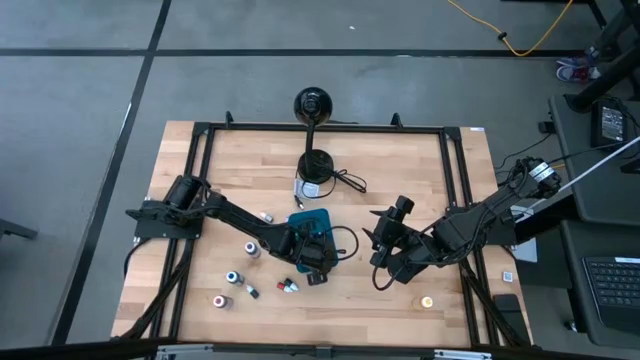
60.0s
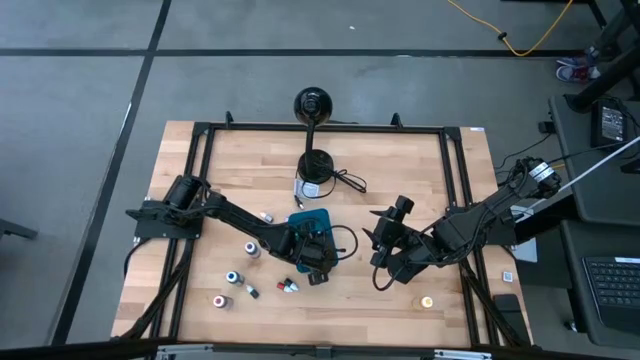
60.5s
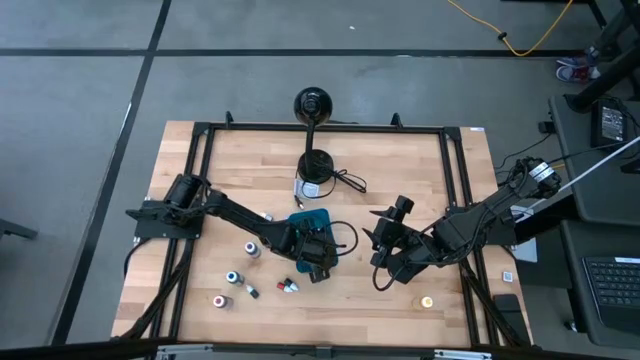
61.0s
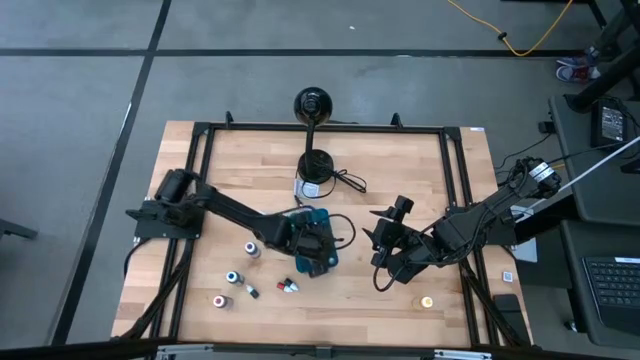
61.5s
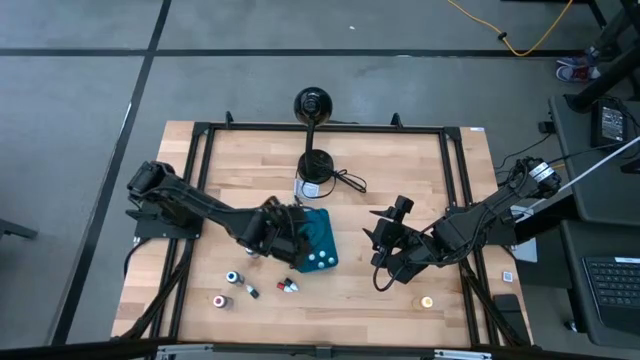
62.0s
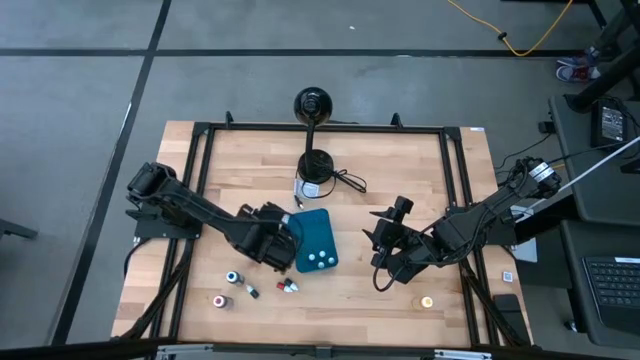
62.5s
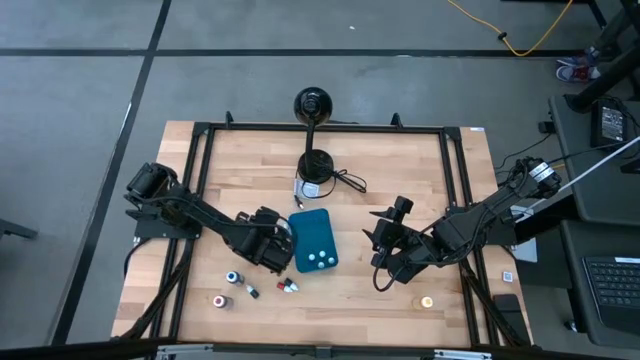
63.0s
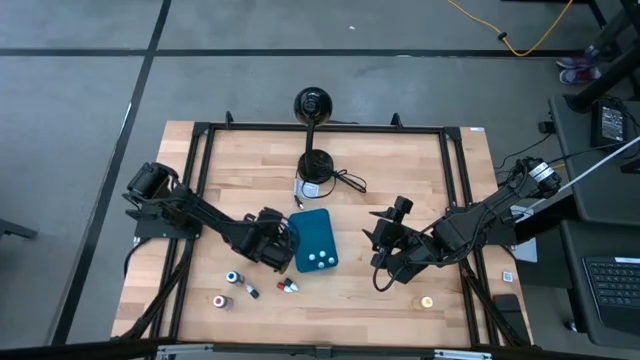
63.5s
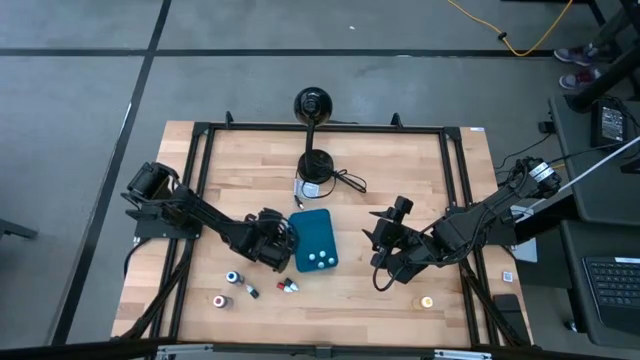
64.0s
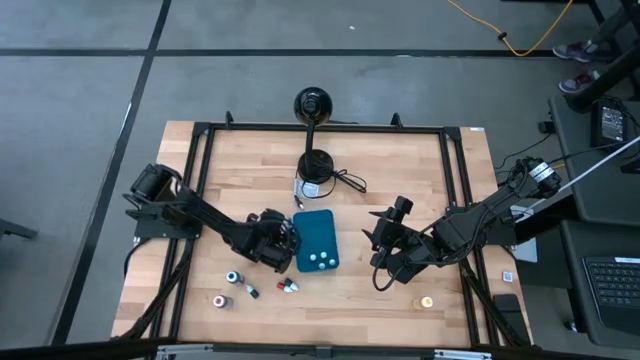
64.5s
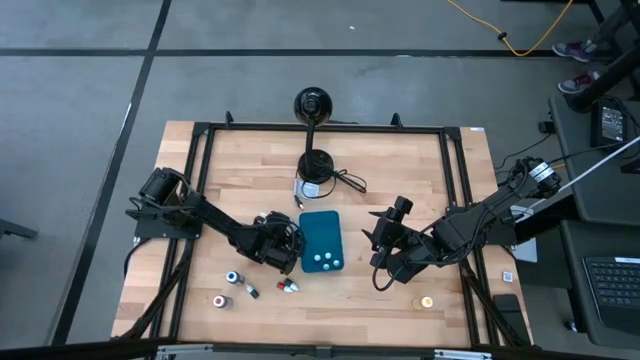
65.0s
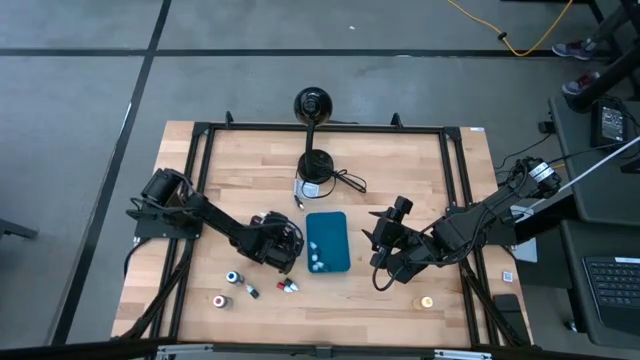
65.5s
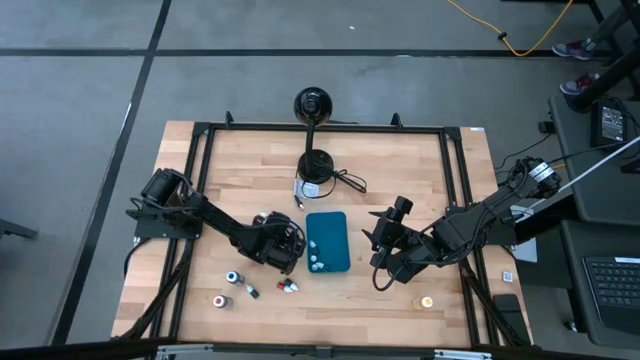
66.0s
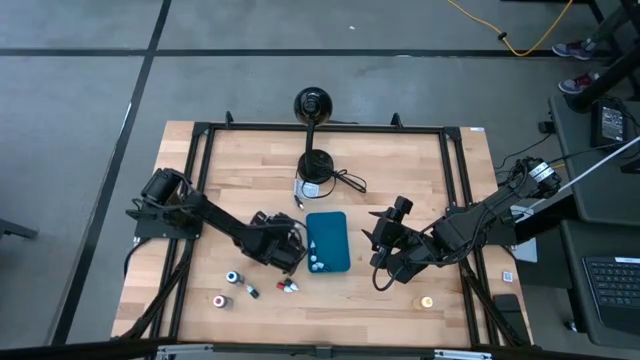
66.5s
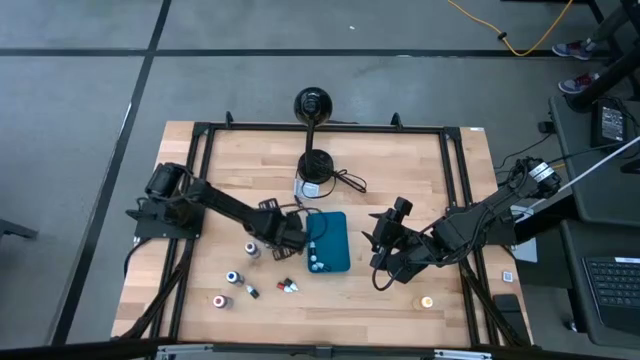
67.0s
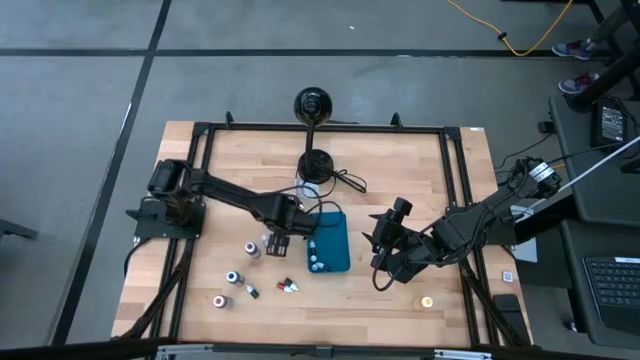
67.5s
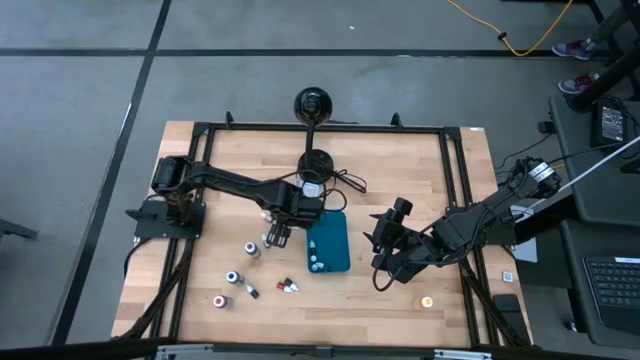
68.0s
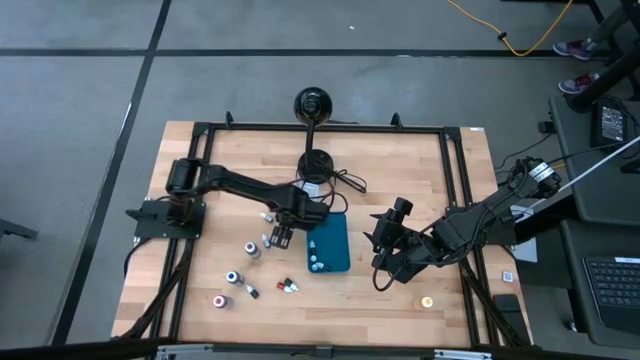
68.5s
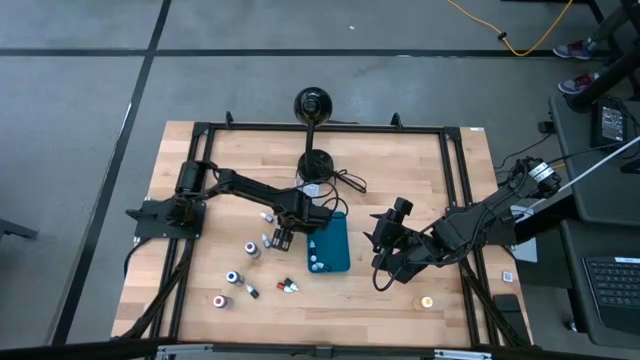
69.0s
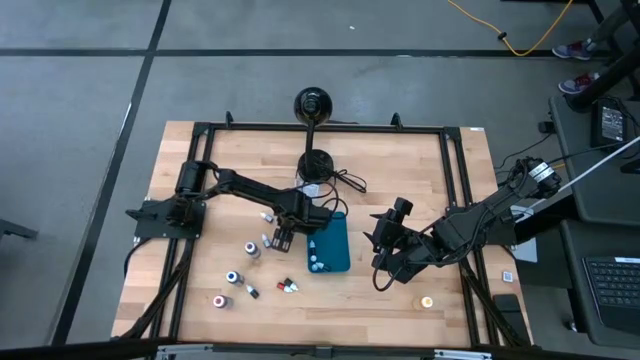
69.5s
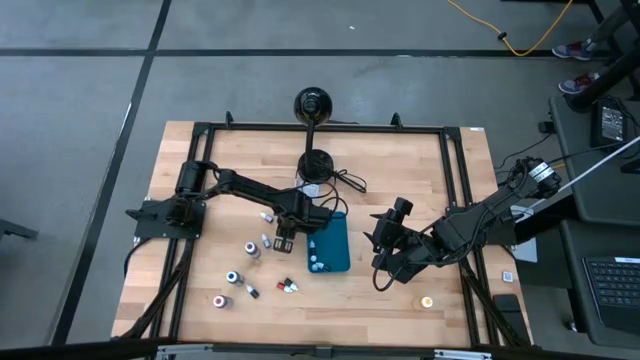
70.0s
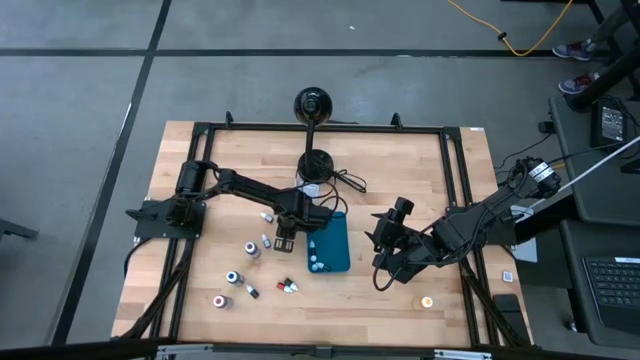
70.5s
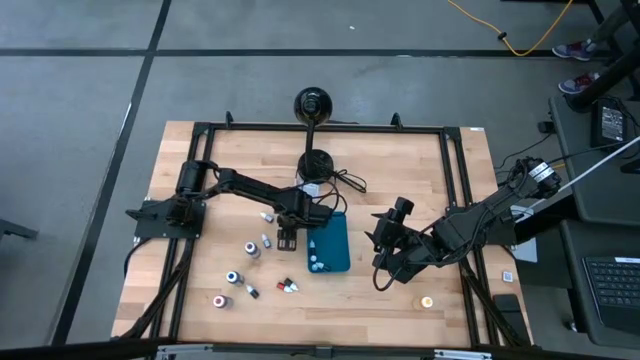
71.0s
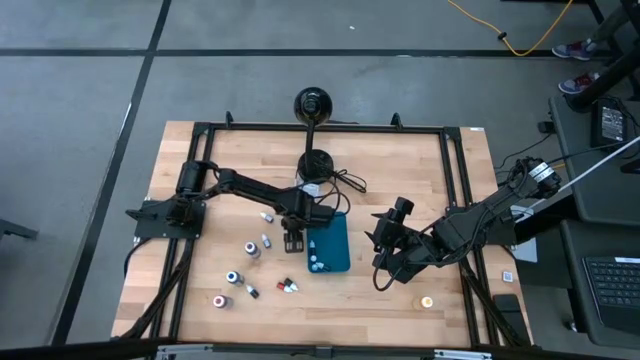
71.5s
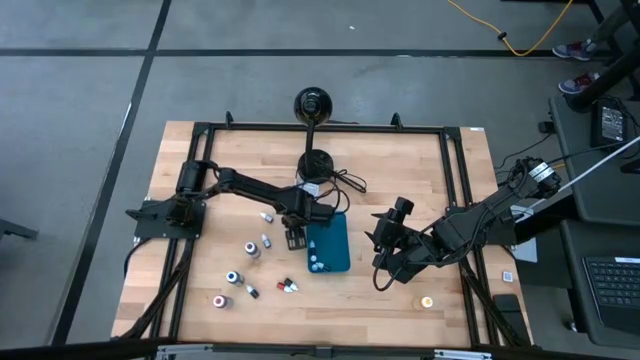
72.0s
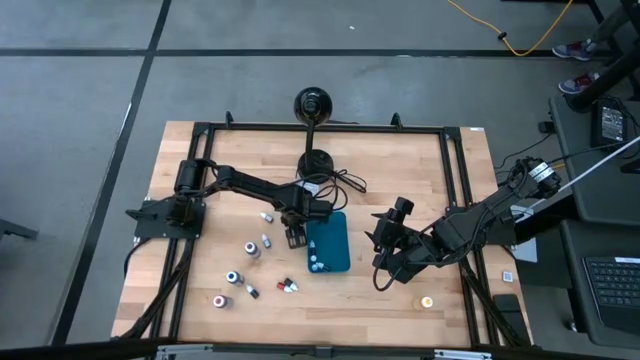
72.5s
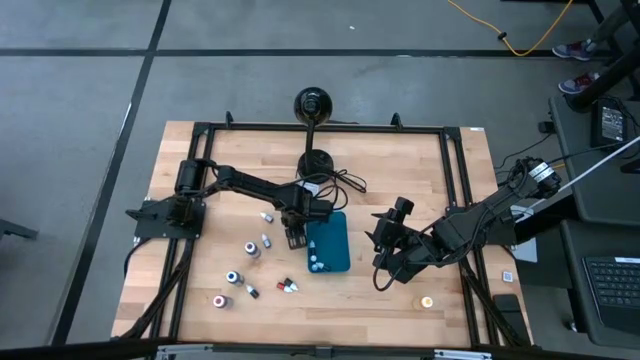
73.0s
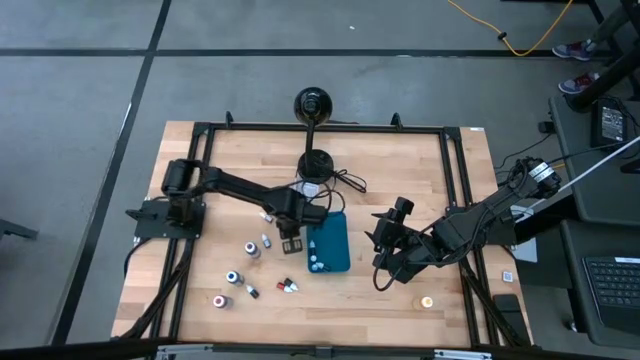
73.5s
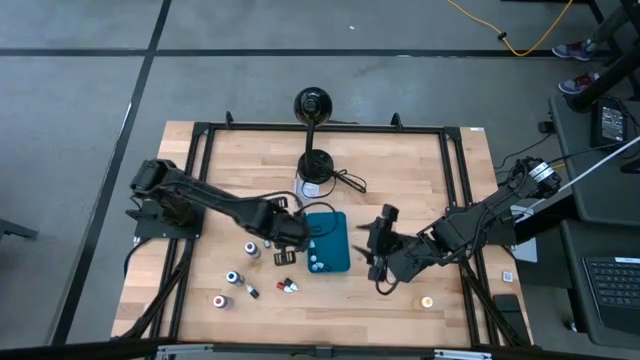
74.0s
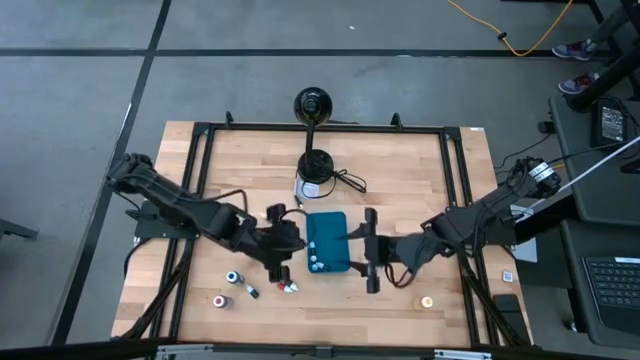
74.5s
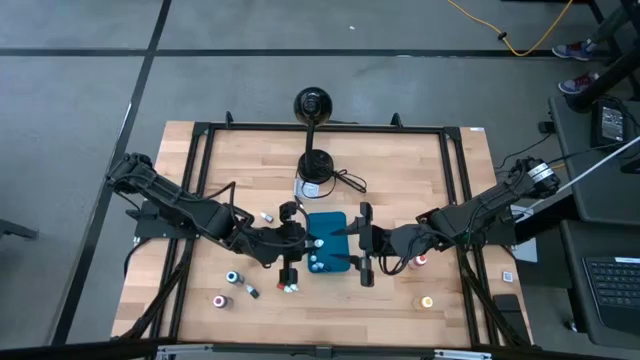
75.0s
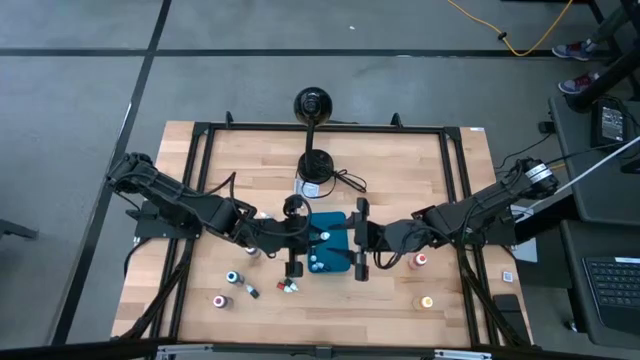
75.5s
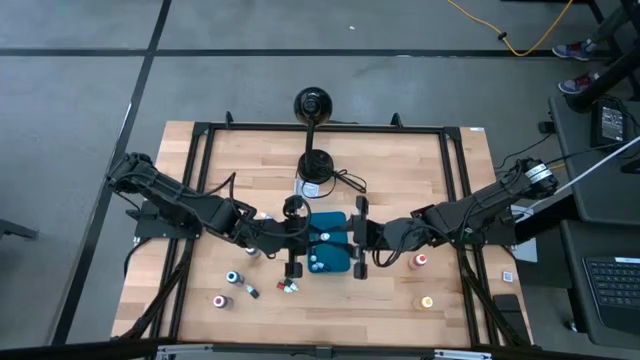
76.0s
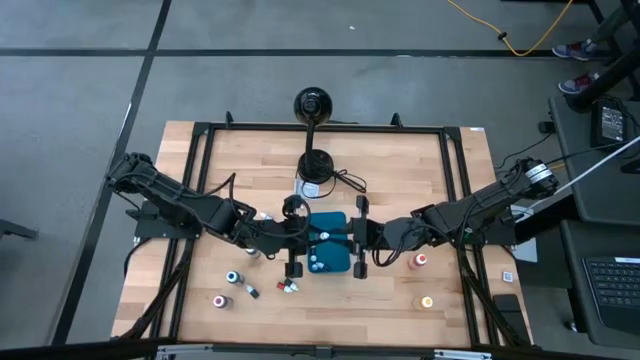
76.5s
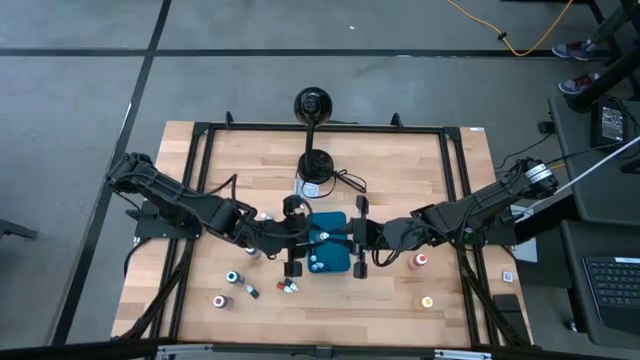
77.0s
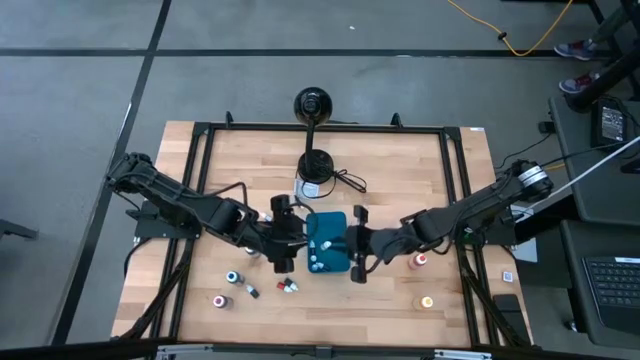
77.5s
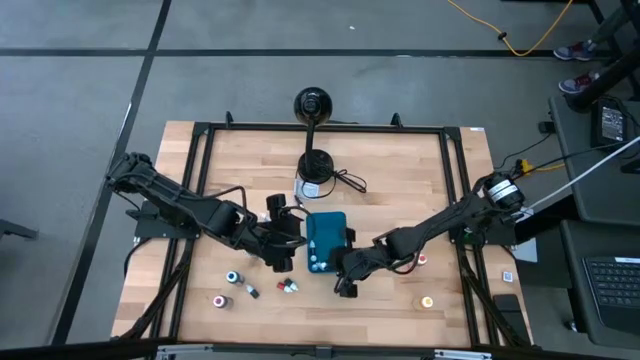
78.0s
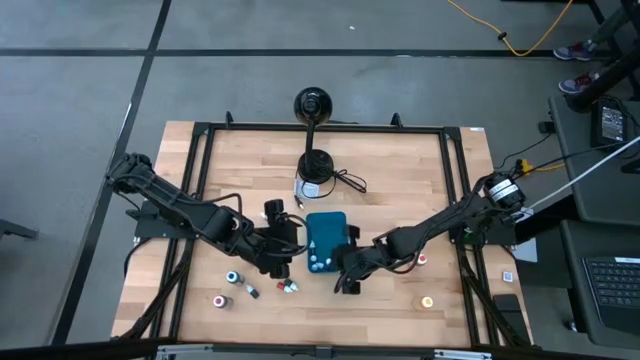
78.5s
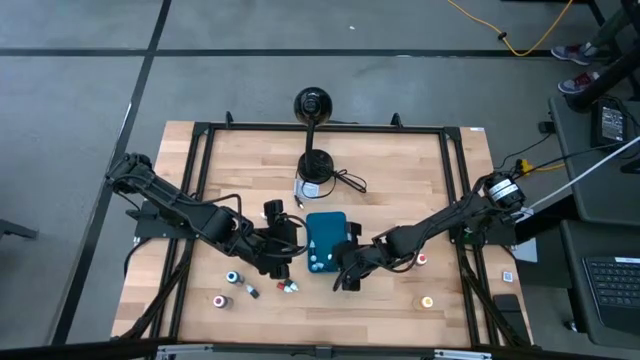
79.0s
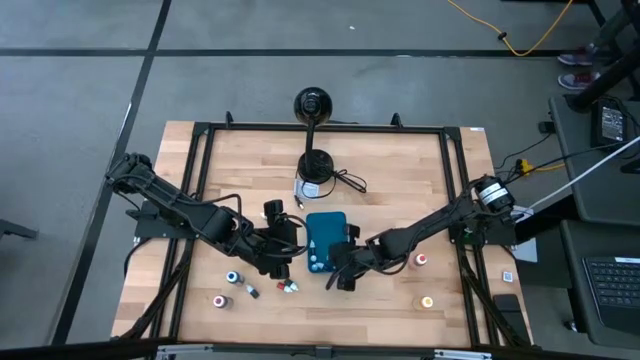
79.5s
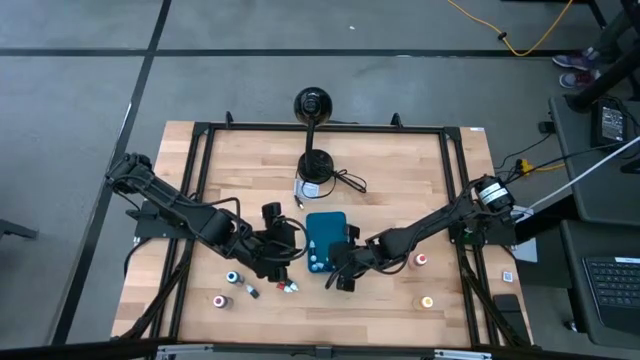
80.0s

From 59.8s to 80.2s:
Task: Pick & Place food coloring
Put the blue small food coloring bottle into the bin
